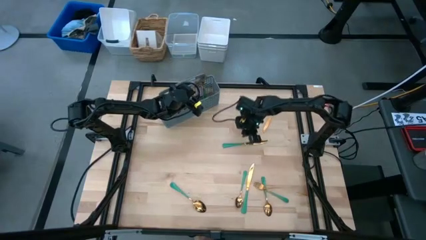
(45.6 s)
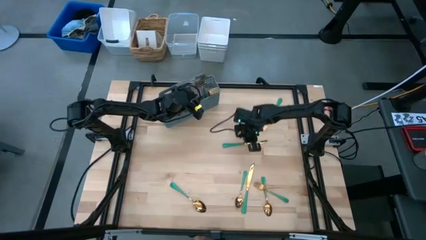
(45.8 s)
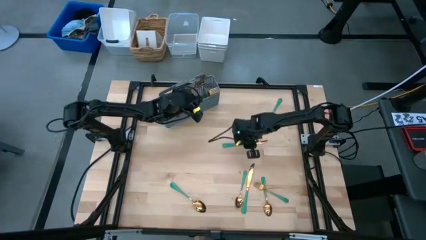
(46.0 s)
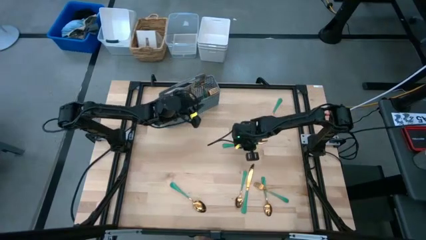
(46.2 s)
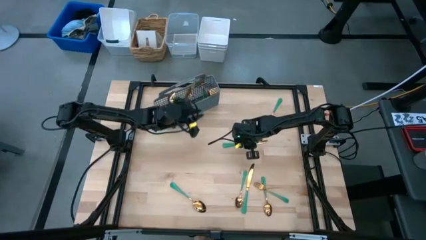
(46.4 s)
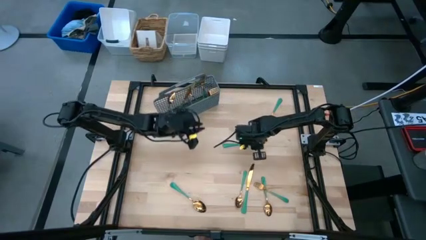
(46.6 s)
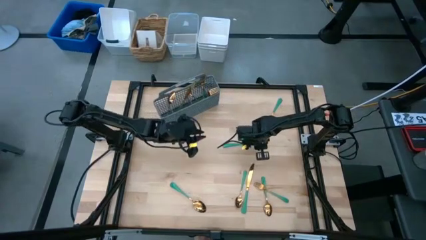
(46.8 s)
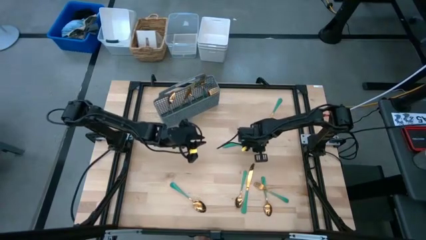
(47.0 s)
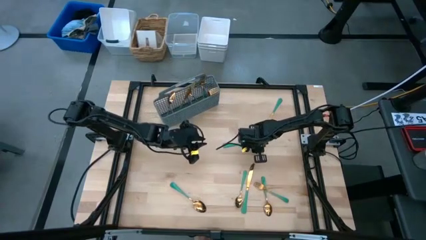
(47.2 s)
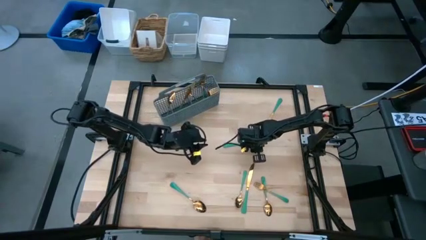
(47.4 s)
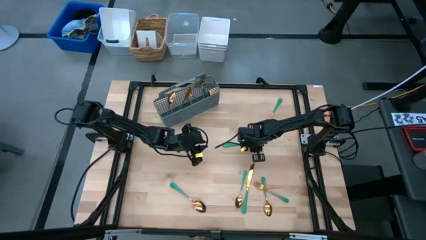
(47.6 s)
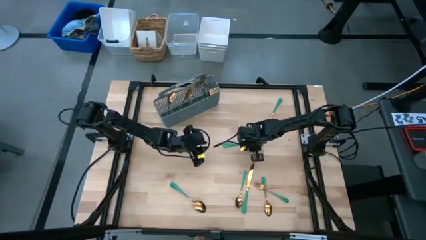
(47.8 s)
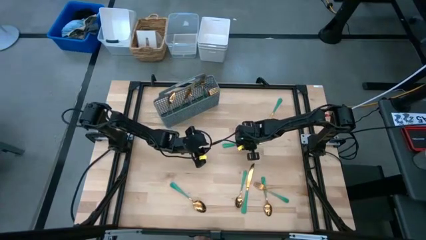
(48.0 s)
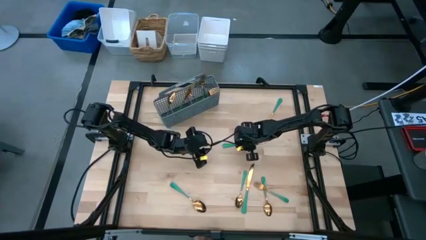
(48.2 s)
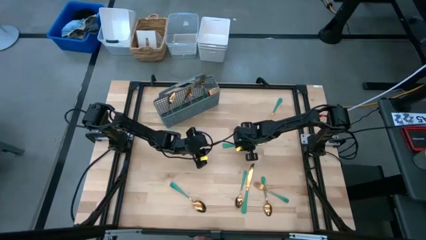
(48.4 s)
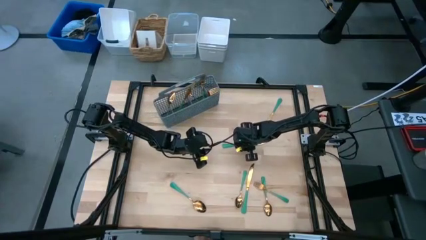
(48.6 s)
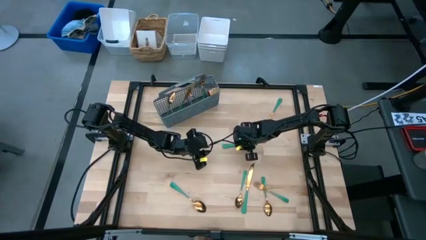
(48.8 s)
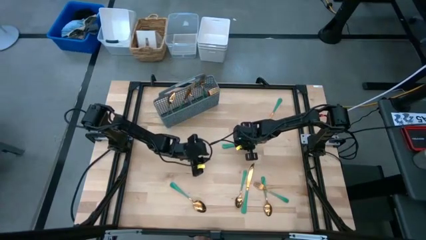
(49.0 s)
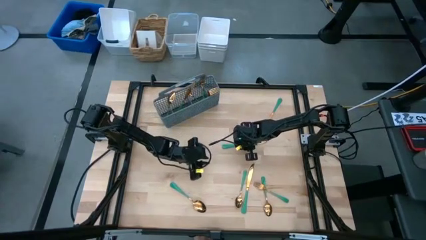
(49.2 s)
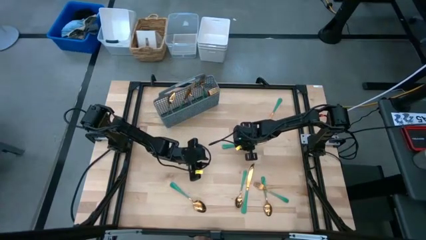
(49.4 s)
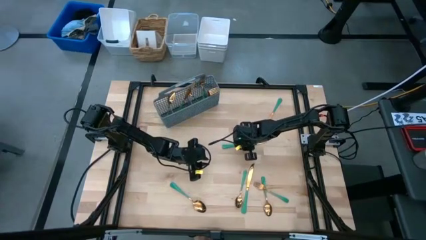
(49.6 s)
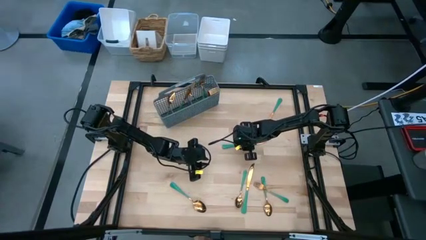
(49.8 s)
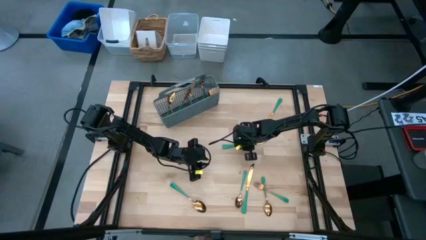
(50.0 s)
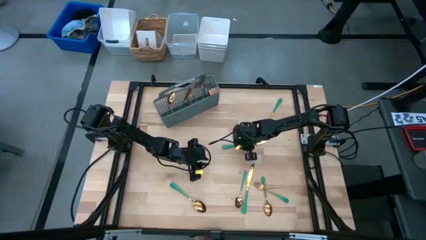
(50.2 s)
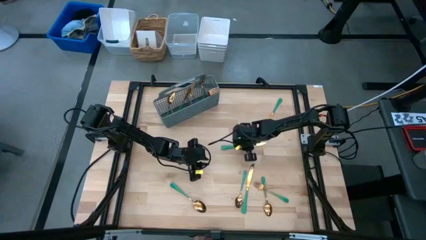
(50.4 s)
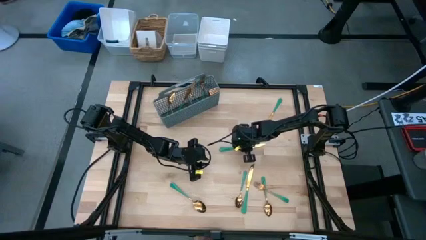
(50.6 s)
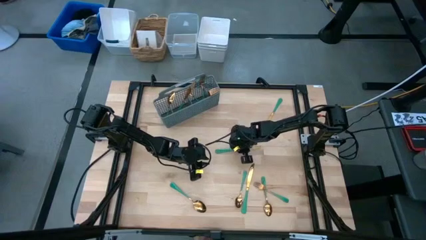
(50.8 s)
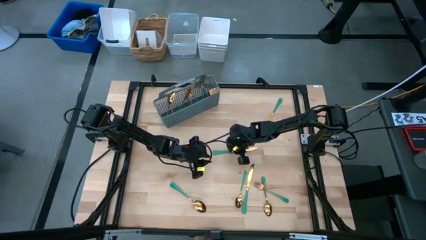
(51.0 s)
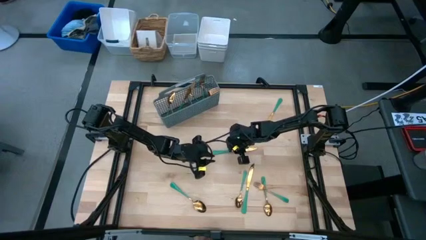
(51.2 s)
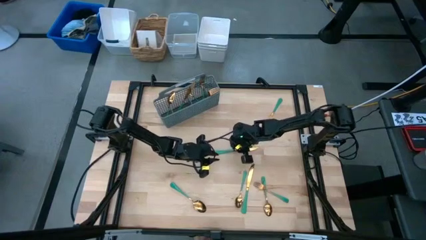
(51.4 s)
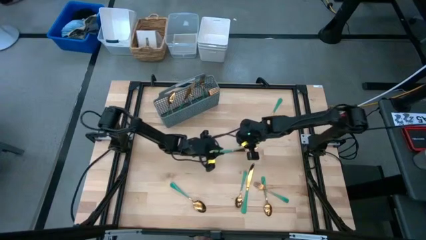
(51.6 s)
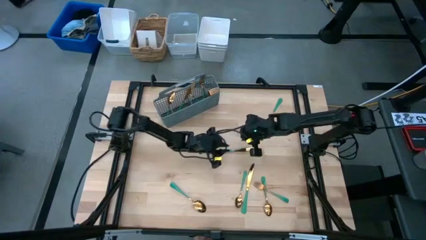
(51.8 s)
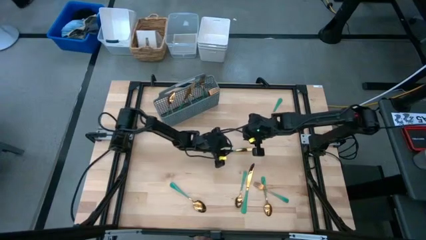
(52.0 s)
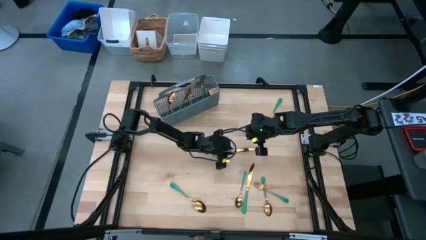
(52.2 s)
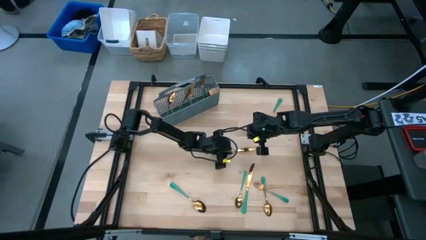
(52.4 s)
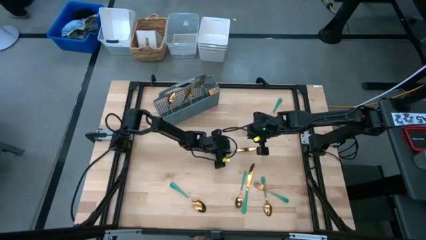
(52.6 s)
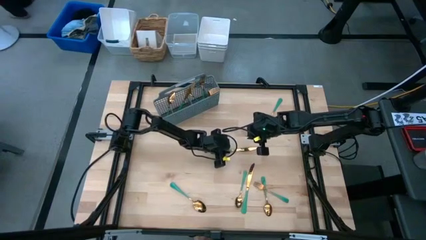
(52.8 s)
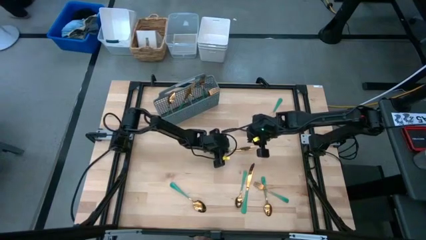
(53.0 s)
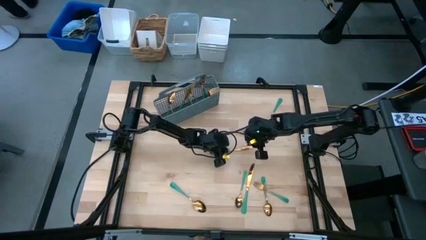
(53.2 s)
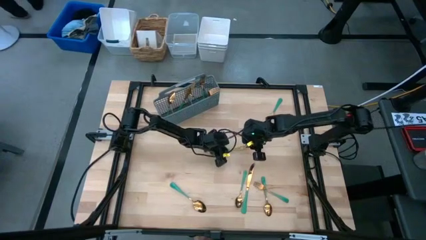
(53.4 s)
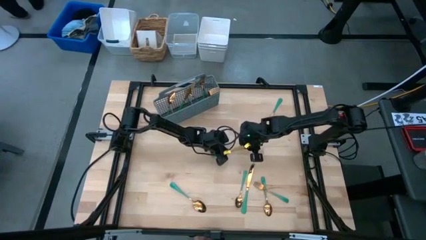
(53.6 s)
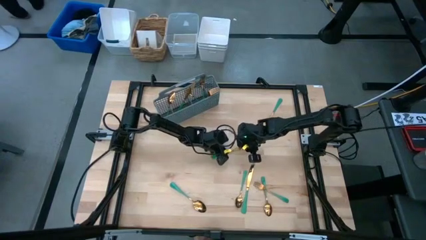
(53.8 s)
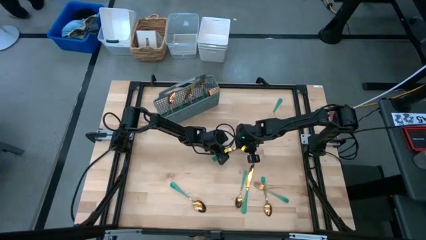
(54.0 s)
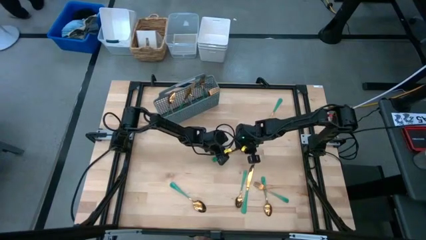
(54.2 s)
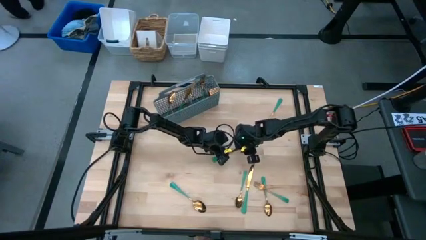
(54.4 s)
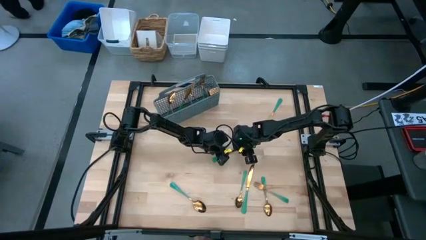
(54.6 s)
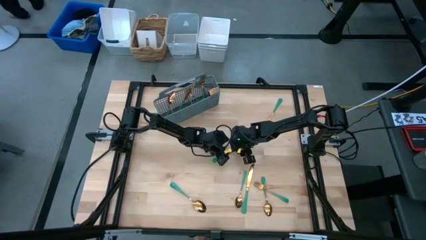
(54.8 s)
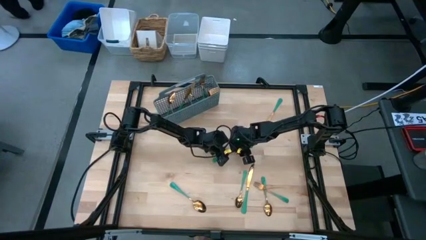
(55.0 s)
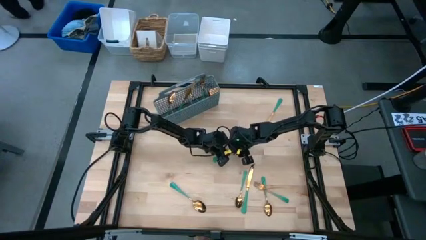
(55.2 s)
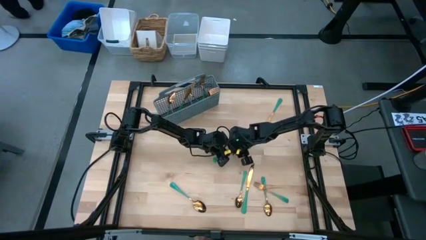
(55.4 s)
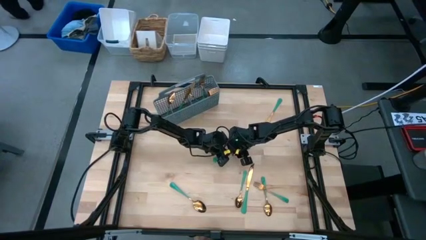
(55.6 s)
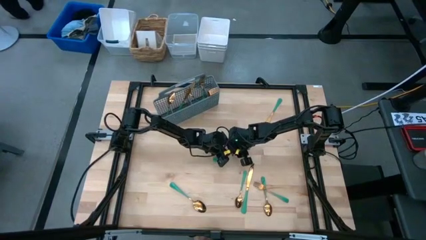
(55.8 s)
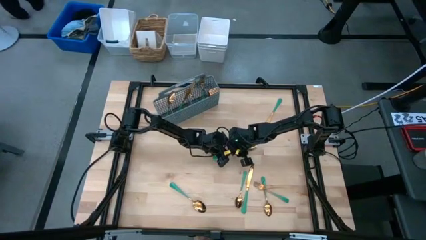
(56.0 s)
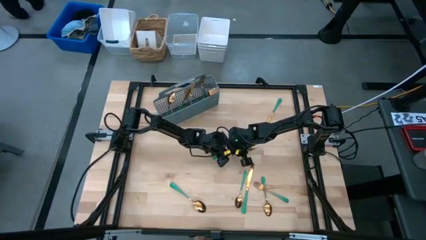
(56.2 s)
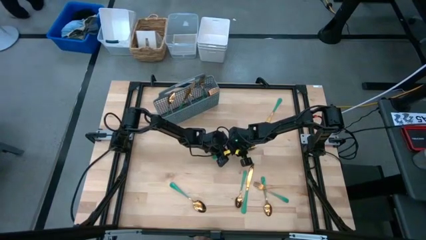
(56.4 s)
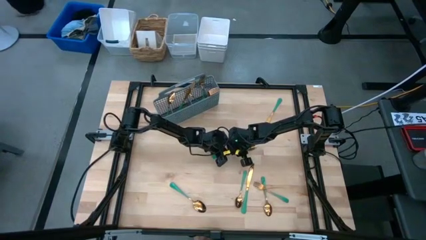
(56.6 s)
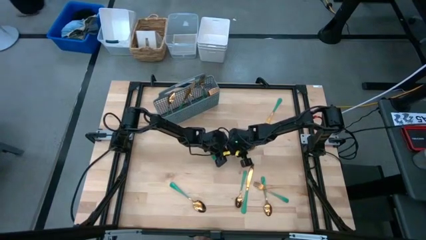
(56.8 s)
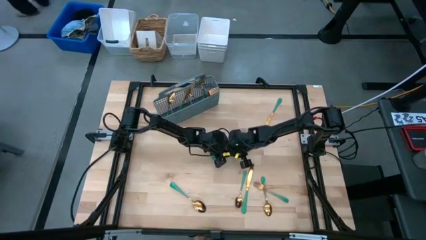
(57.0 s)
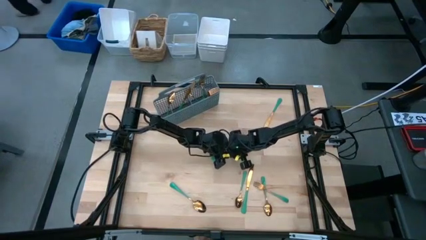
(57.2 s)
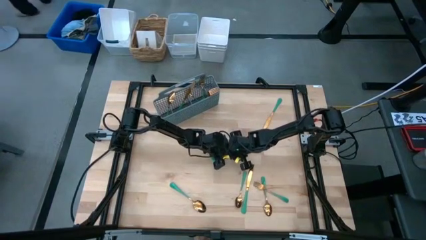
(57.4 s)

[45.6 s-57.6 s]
Task: Sort silverware
Put the knife into the middle left section of the silverware holder
